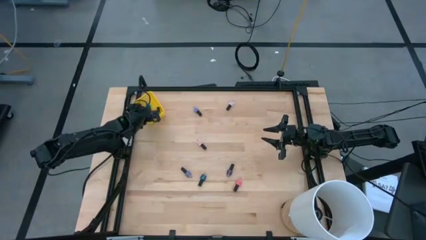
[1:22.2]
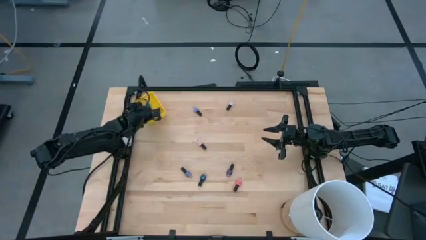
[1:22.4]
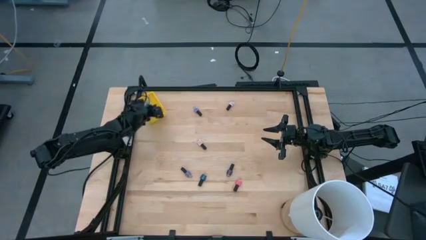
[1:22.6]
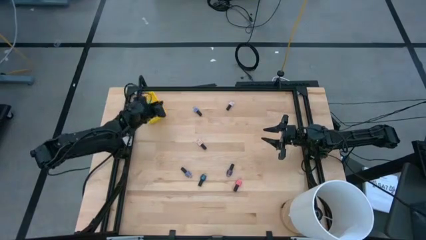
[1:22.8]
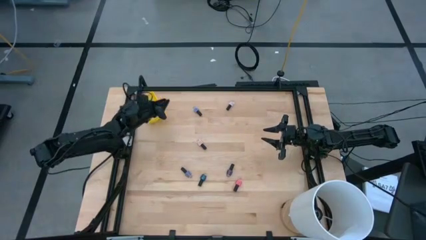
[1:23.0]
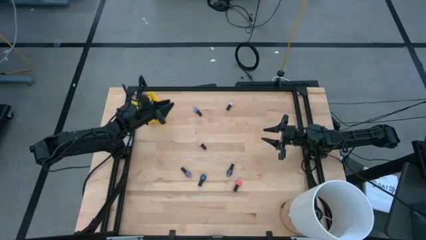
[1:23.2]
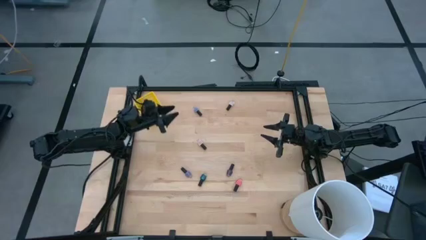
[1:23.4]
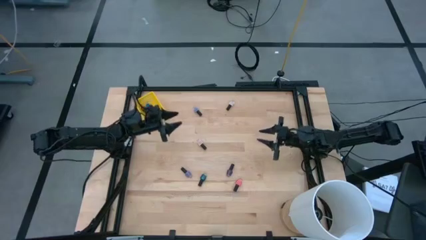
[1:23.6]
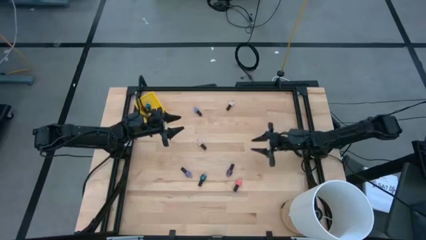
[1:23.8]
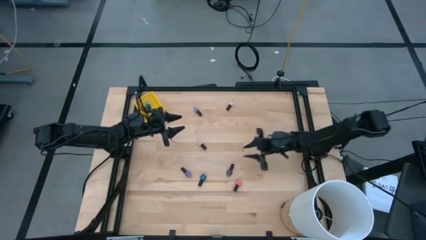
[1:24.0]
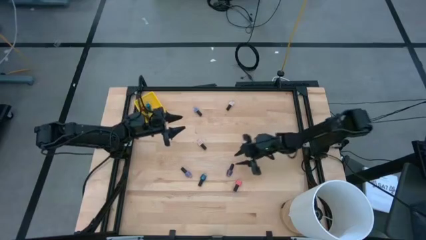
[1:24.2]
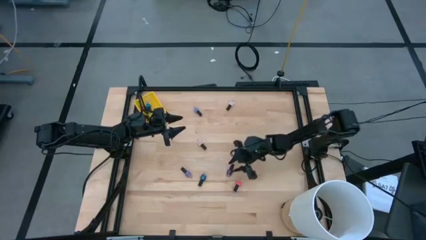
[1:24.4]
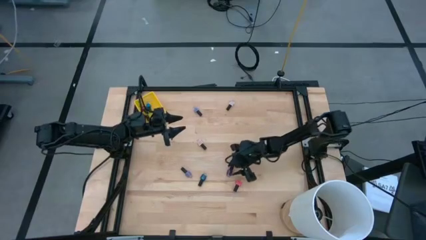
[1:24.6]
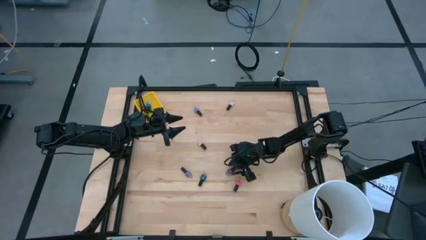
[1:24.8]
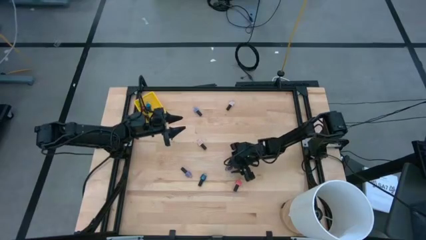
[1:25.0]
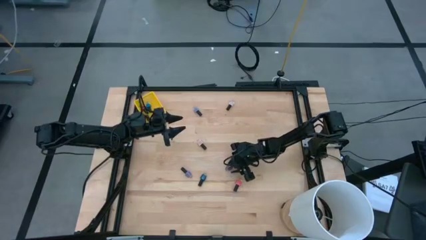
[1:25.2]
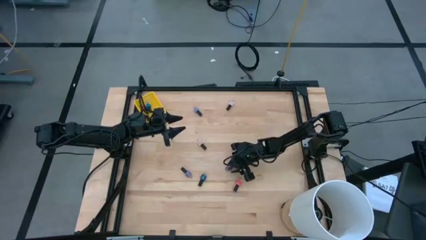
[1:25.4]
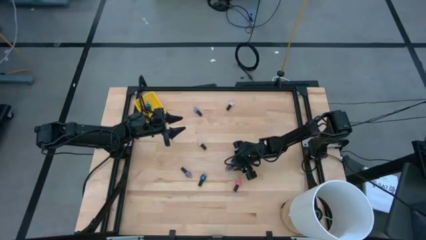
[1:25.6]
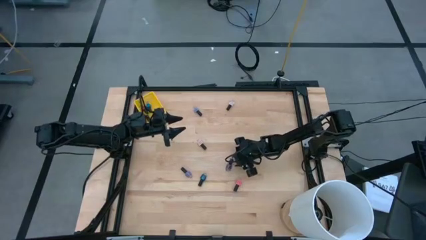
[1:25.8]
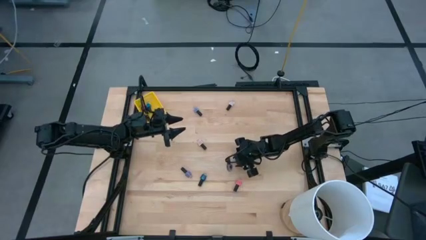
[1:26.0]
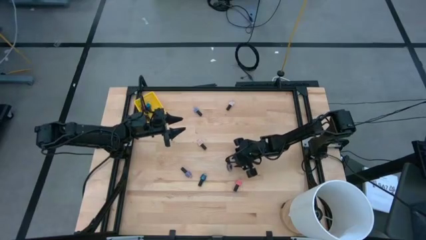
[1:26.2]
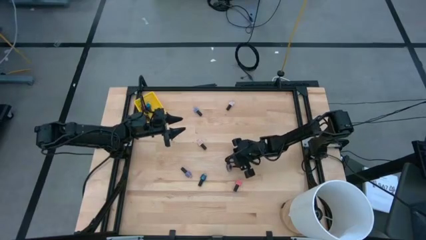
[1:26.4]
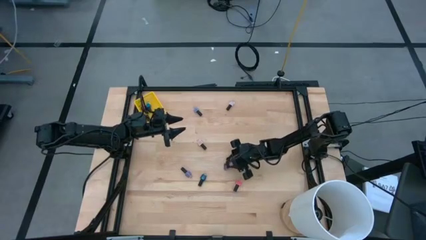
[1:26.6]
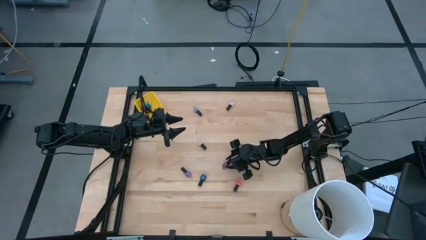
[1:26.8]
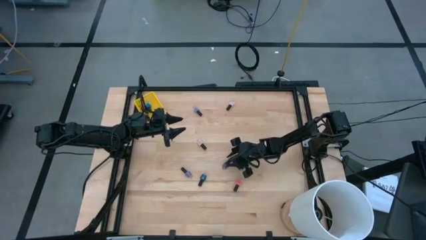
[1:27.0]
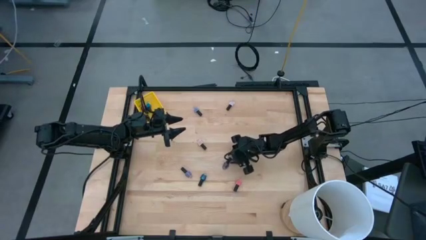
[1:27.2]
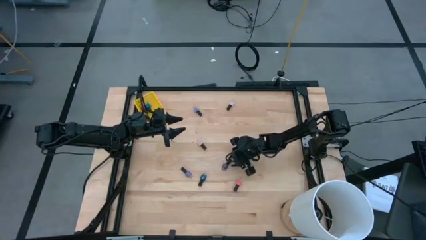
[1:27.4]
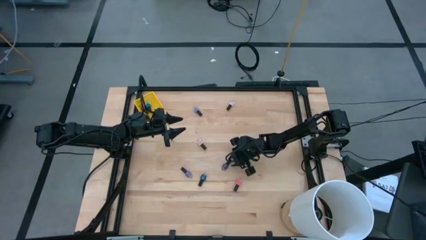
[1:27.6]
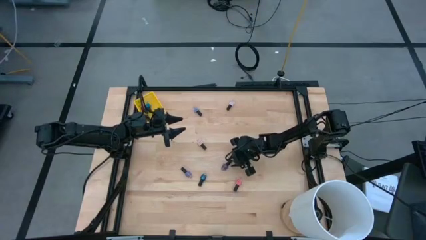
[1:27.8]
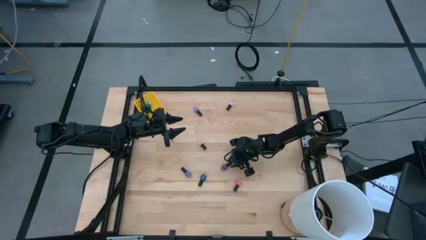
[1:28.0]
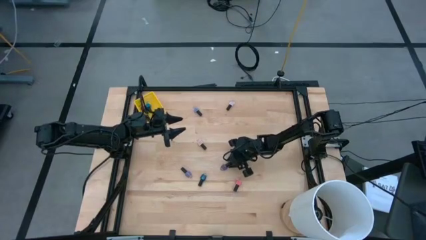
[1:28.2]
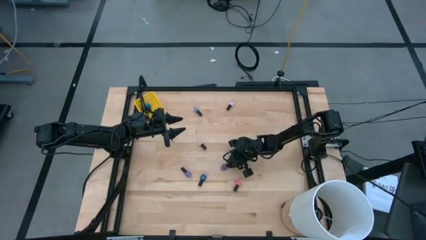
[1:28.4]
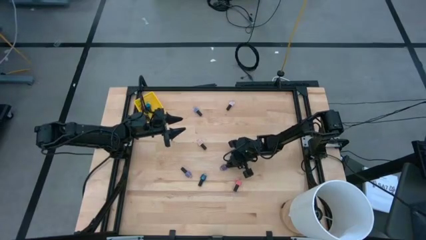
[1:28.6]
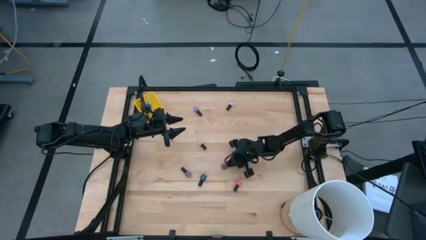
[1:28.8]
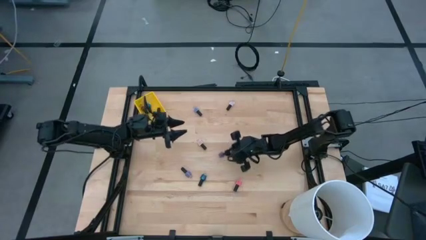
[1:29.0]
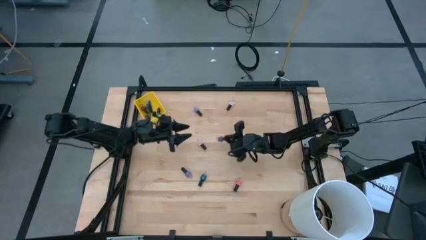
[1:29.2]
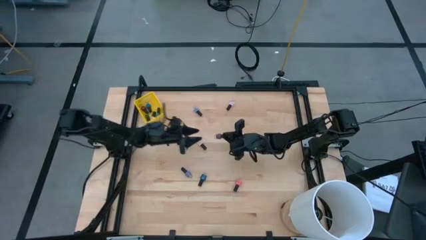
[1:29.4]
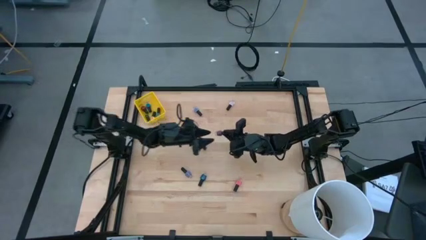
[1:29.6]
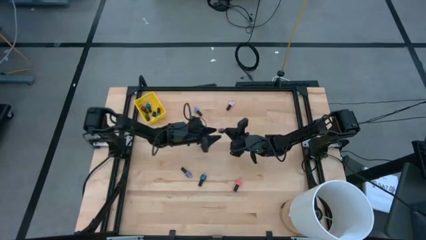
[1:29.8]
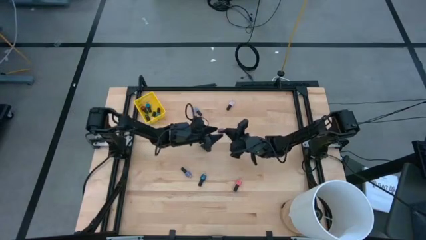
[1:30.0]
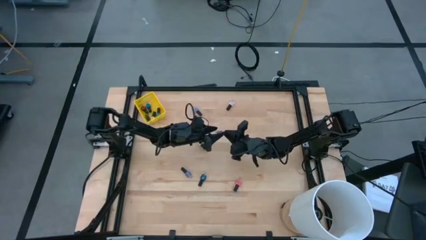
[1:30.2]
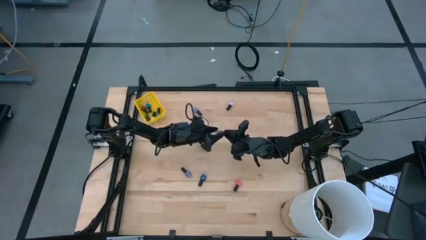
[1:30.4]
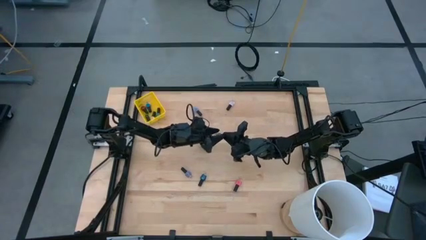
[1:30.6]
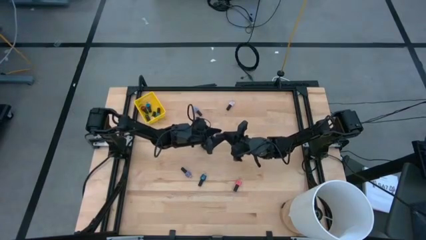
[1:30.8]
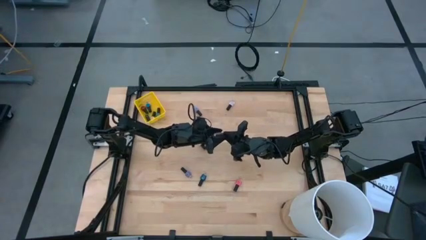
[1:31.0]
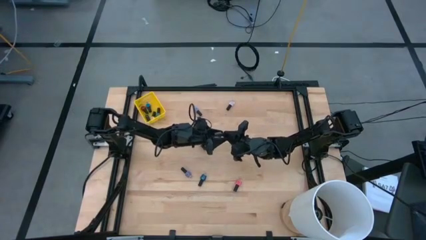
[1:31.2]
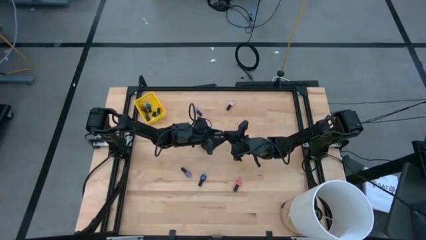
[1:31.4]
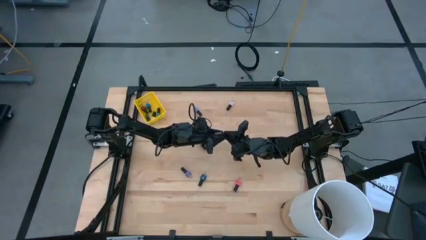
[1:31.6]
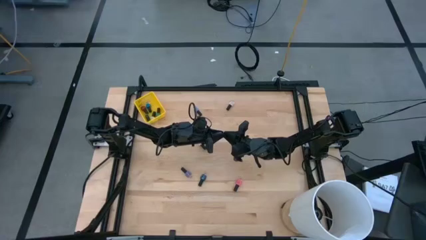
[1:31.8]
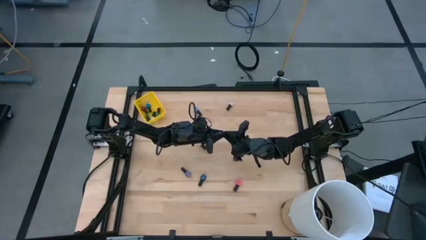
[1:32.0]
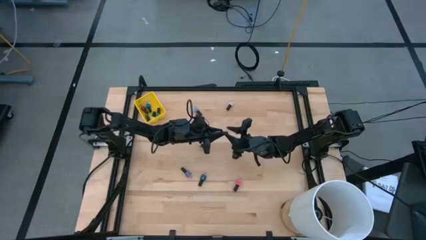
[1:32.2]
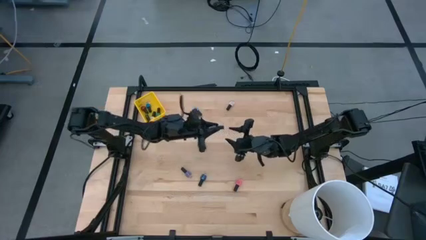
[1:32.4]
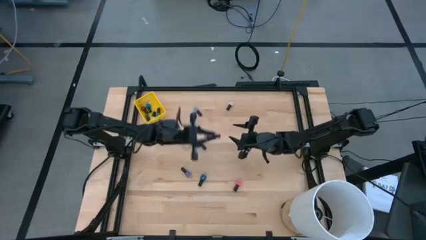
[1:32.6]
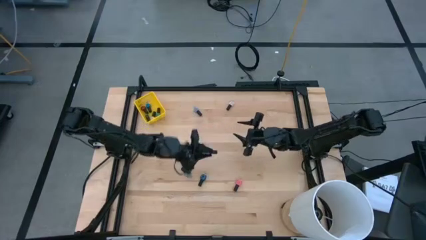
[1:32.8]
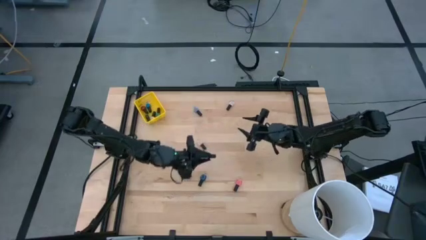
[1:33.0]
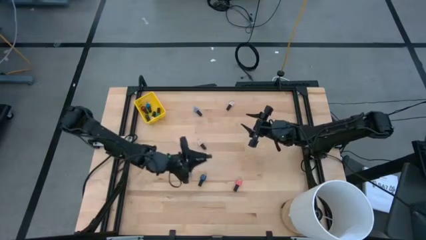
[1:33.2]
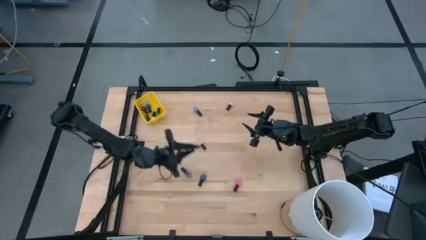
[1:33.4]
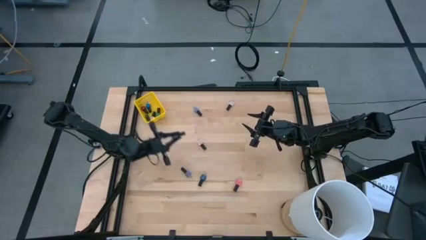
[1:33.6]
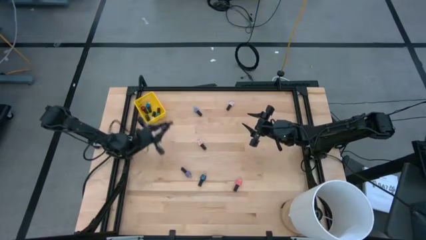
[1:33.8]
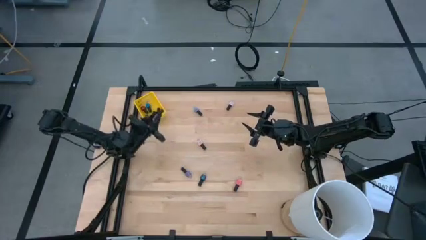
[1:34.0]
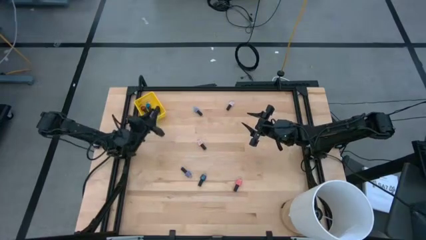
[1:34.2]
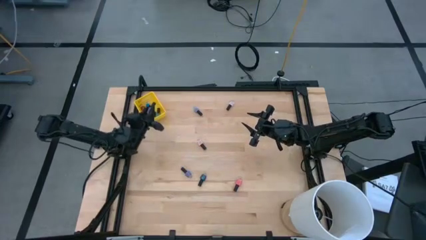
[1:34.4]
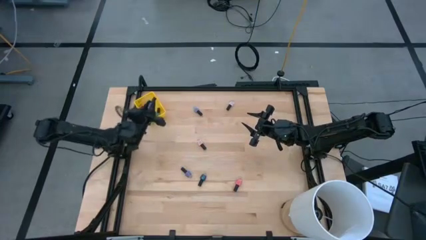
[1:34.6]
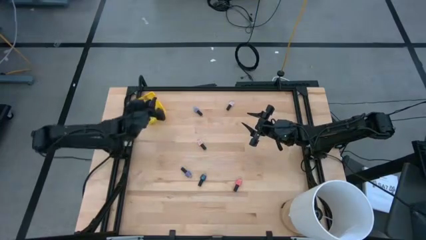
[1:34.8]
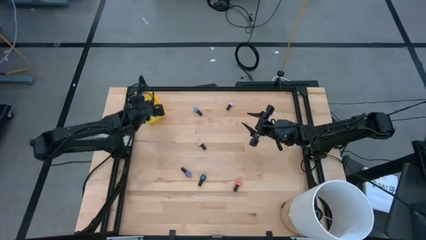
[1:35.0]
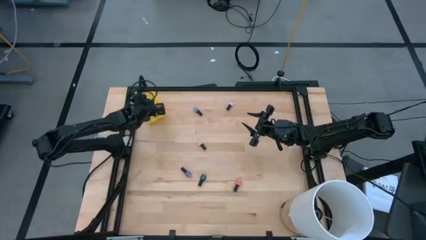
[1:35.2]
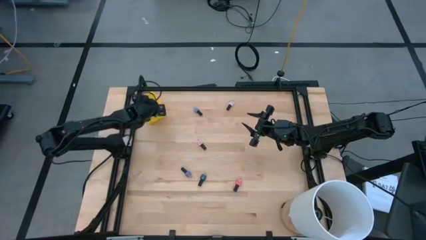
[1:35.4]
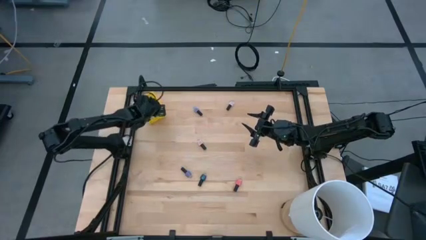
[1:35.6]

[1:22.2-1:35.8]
Task: Pick & Place Nail Polish
Put the dark purple nail polish into the yellow bin

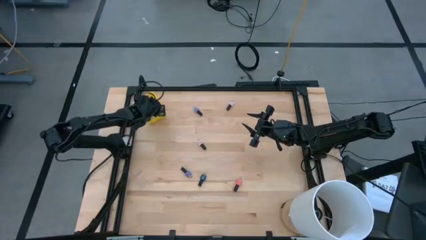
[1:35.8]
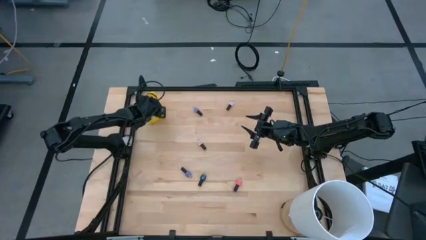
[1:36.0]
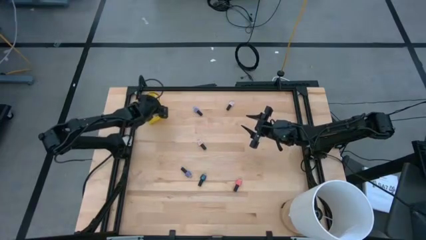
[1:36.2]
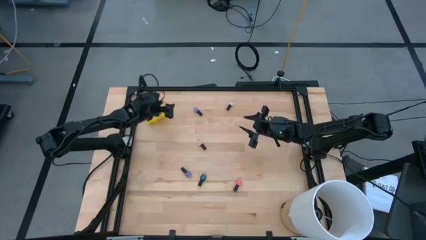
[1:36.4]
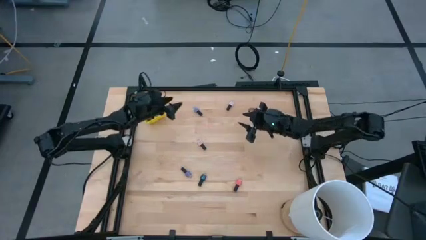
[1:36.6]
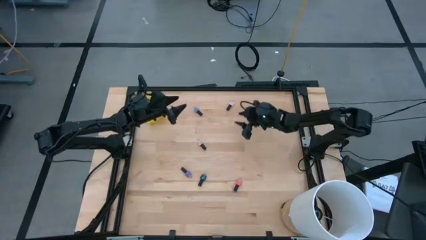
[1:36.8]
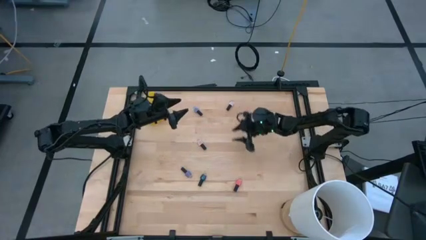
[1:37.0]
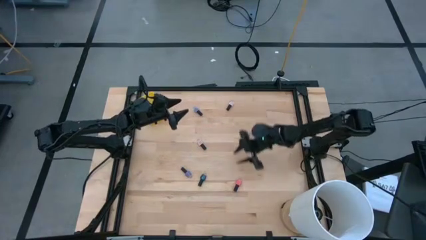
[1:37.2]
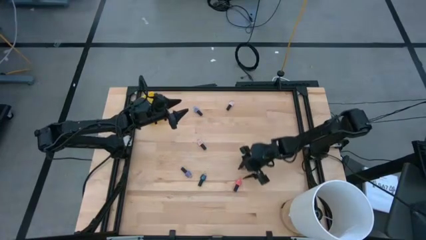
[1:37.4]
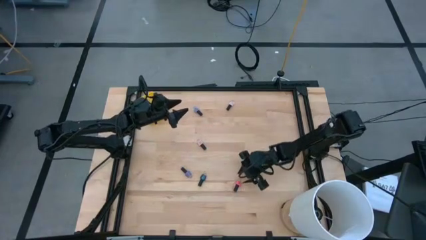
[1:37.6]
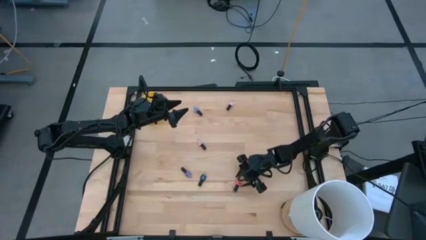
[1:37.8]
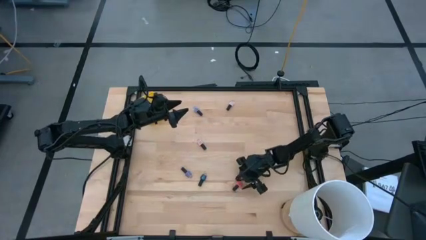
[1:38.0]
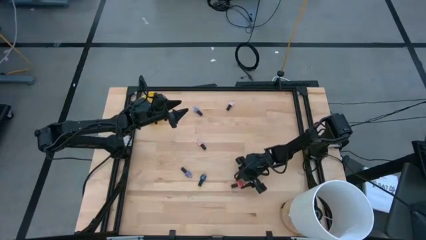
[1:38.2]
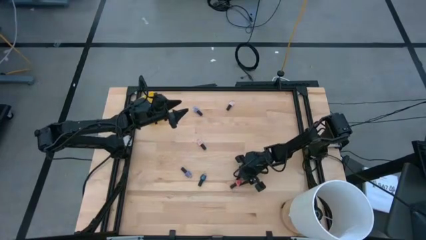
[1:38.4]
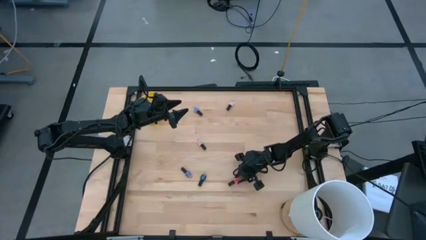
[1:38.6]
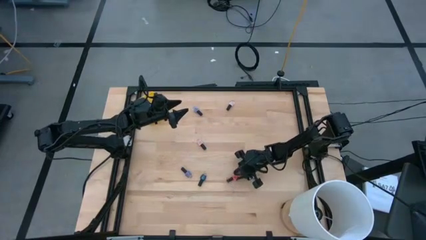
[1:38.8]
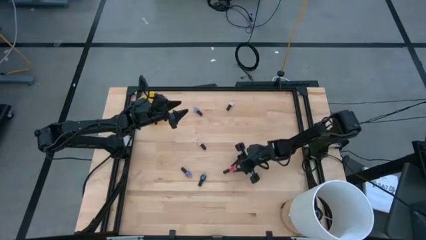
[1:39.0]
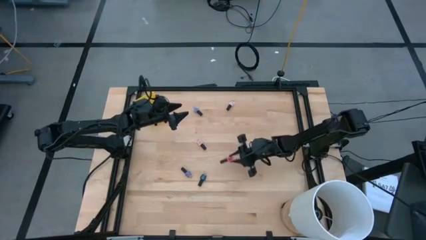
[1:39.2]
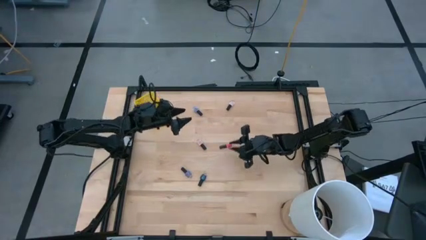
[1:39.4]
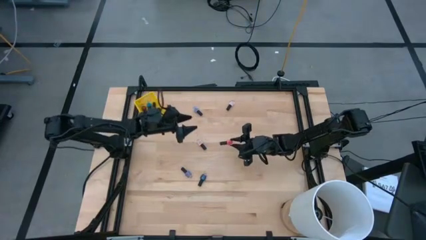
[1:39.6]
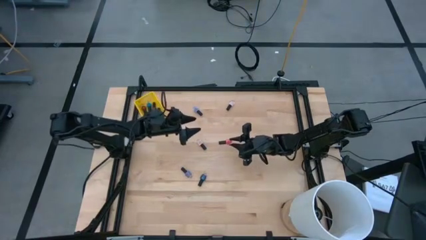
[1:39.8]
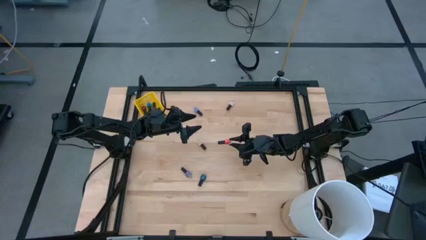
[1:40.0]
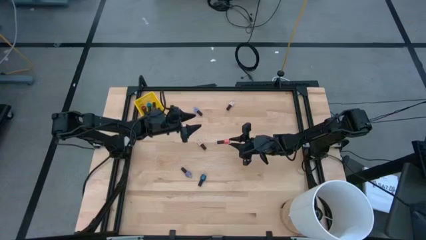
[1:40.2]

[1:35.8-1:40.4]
Put the dark pink nail polish into the yellow bin
